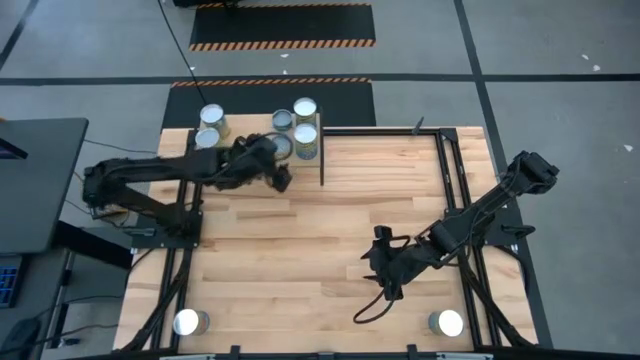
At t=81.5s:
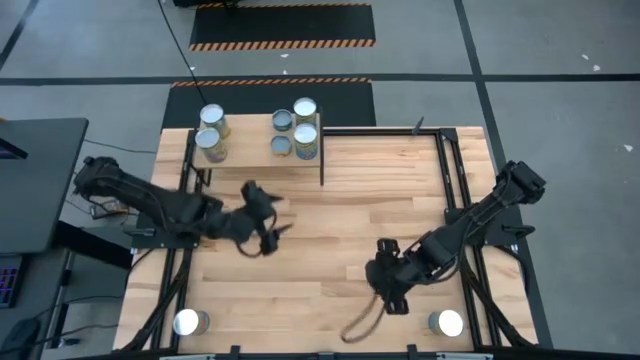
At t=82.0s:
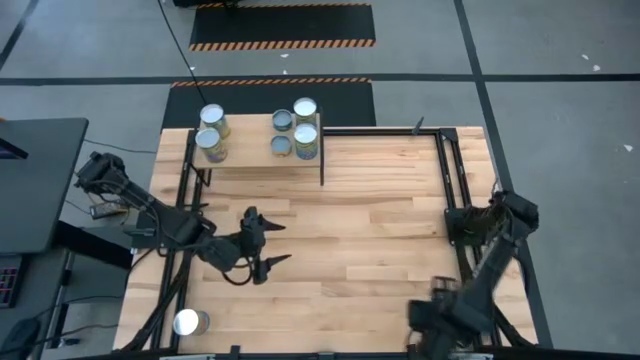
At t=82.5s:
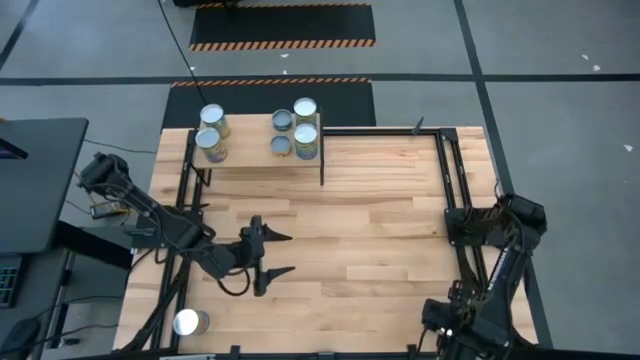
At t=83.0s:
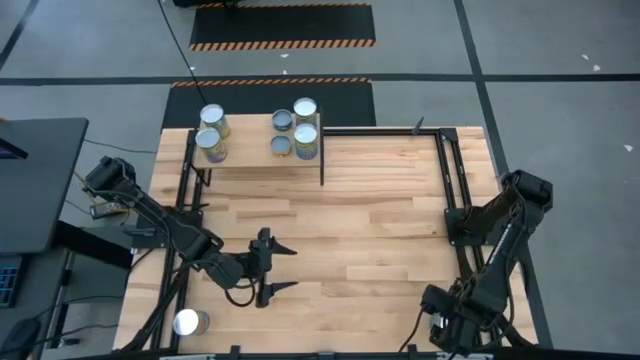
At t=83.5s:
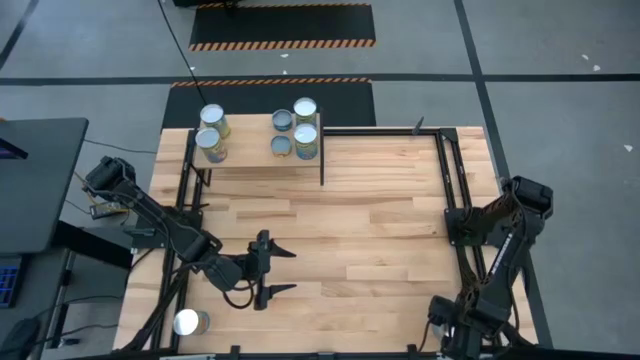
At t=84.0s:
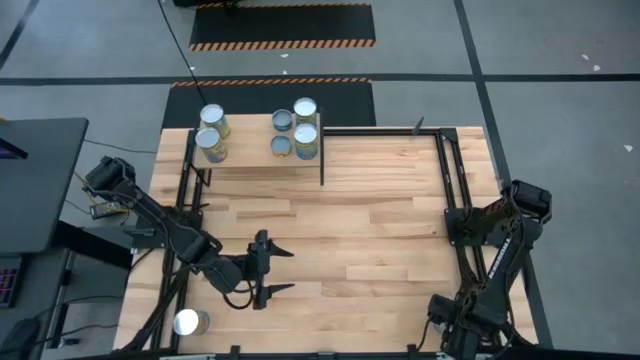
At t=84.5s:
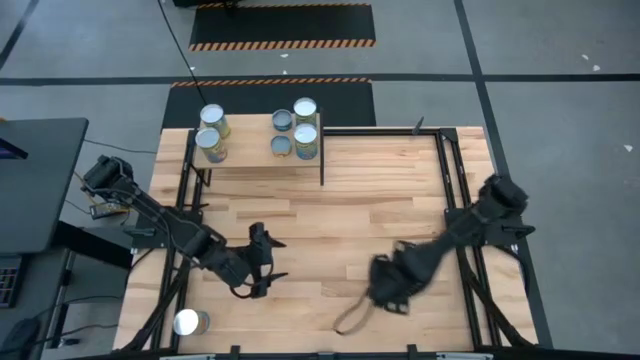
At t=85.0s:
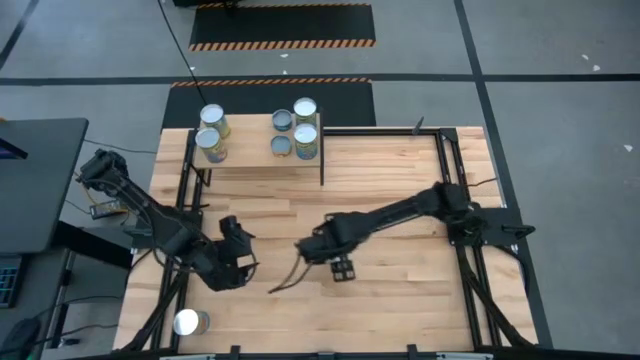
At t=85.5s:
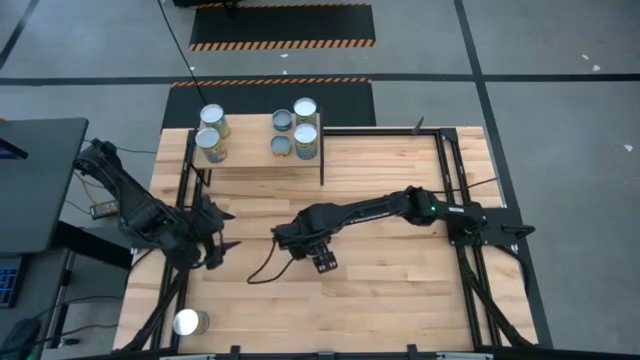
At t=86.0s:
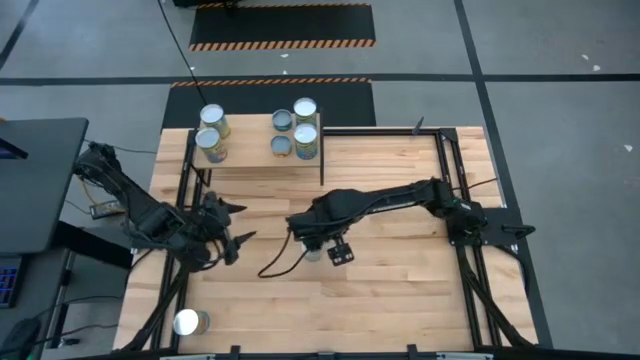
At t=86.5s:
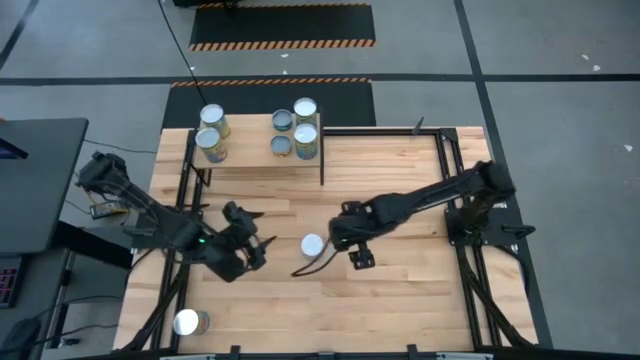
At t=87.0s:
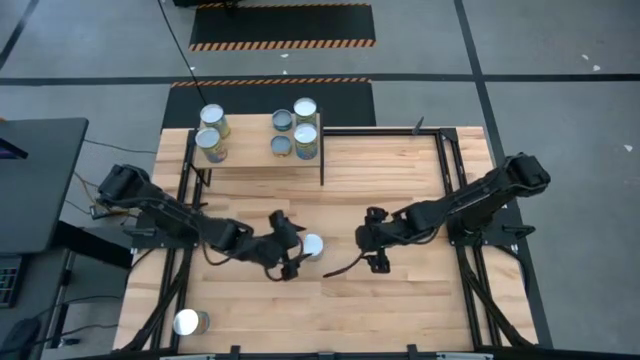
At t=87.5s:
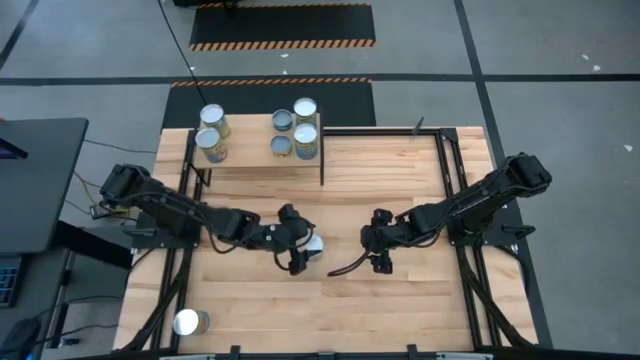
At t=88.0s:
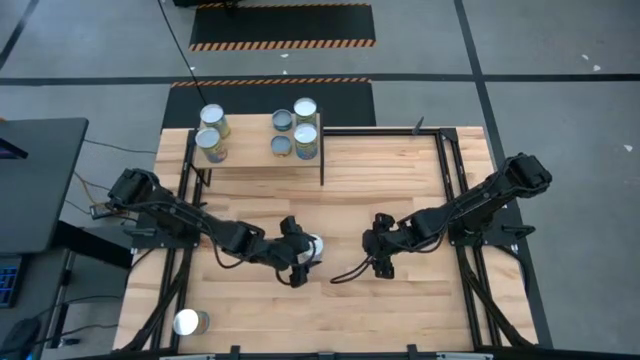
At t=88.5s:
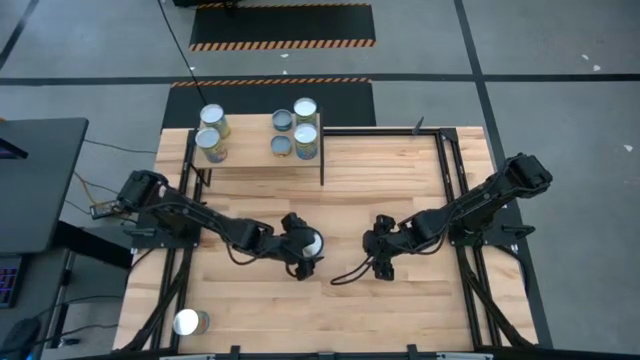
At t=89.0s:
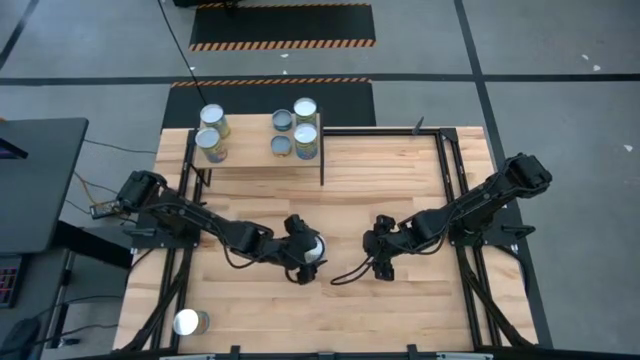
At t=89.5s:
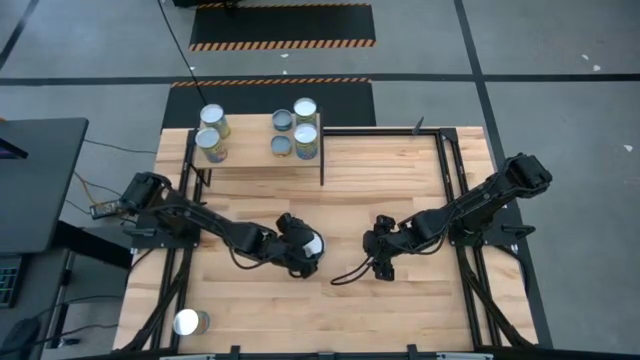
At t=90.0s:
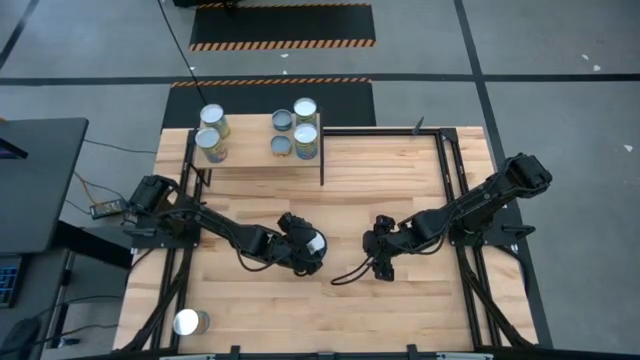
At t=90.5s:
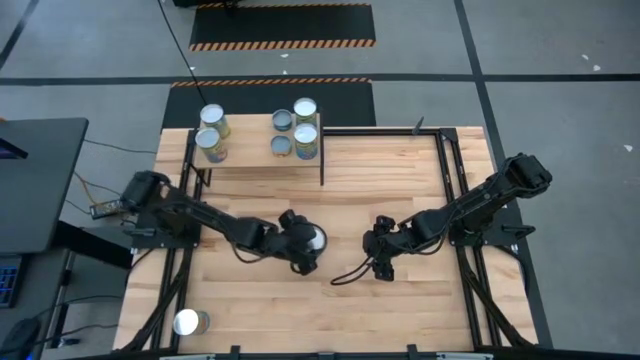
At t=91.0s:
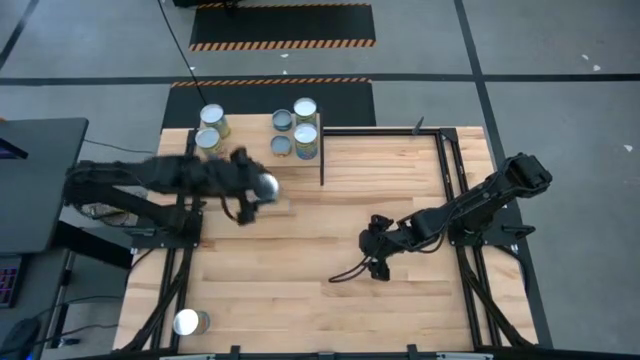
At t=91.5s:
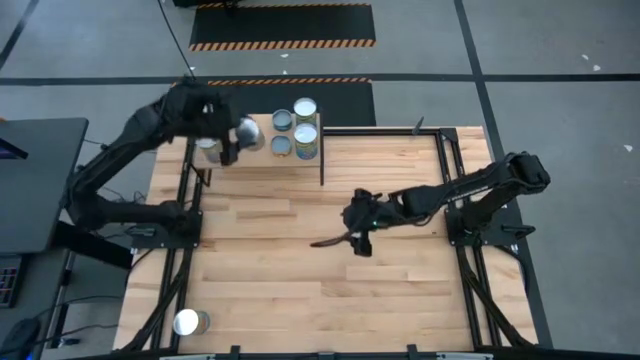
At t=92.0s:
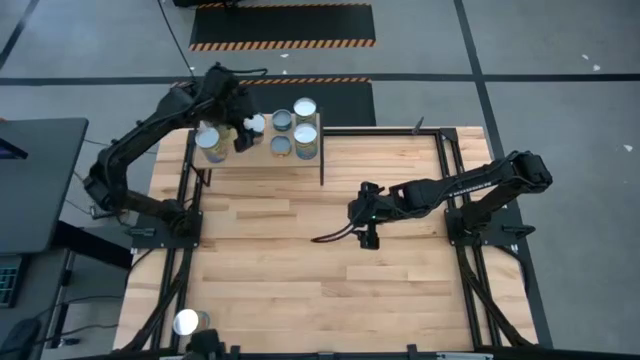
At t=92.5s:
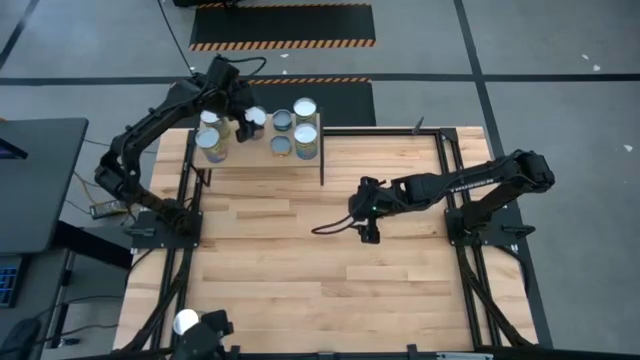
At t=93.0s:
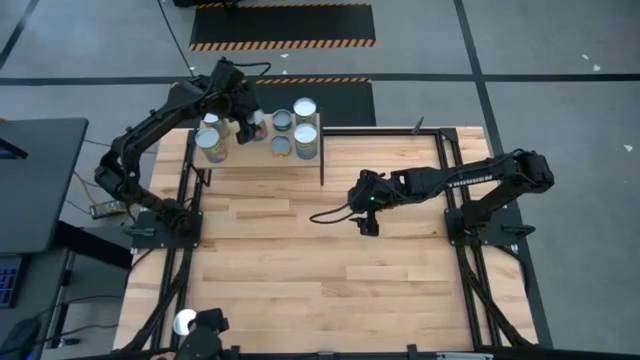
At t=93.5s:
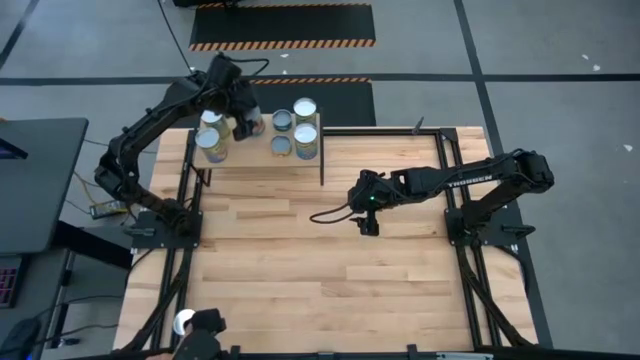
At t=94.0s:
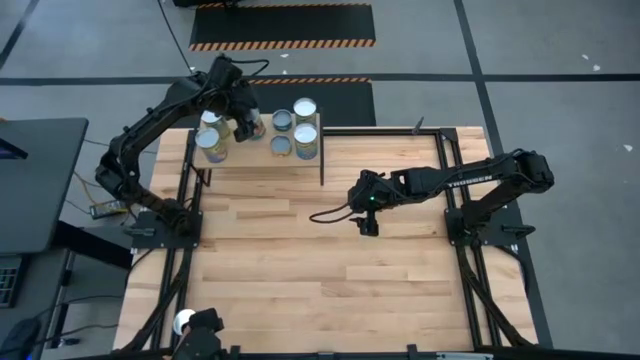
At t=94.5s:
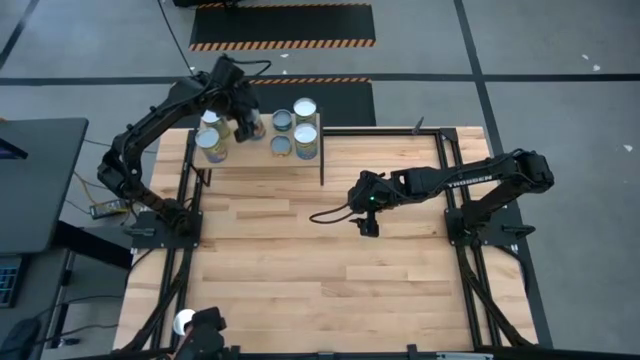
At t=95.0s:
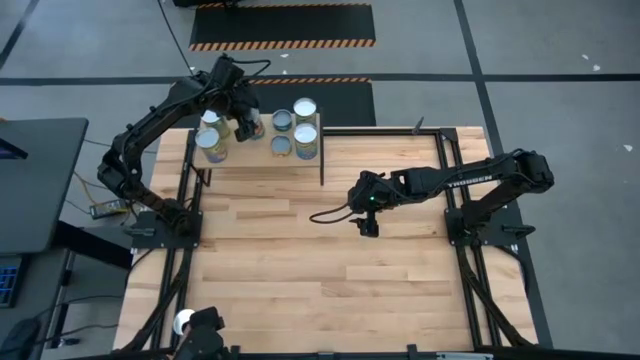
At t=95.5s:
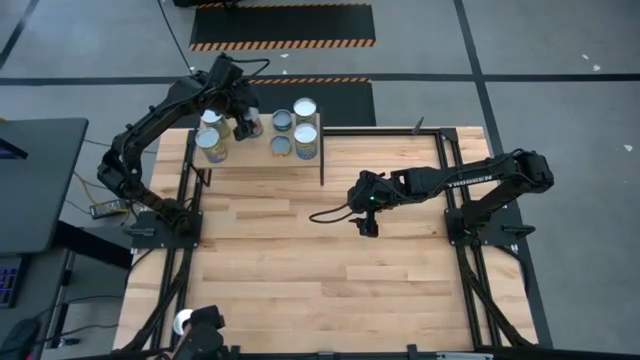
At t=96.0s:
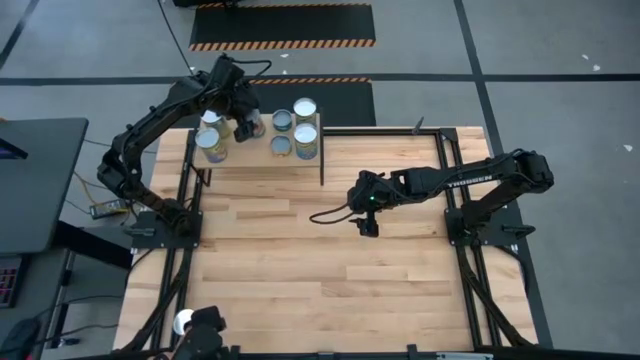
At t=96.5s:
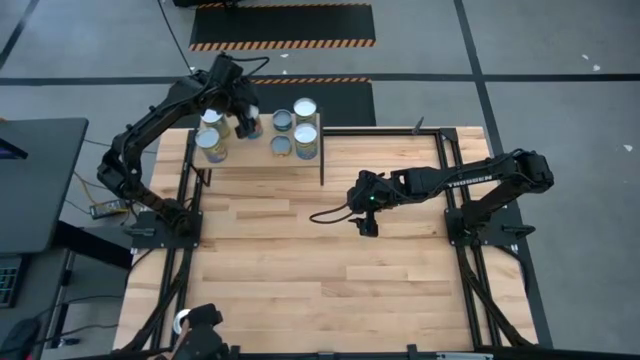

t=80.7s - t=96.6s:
Task: Pick and place cans onto a shelf
Put the right canned tomatoes on the shelf

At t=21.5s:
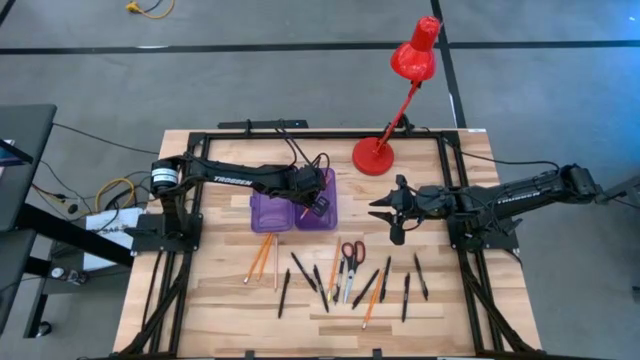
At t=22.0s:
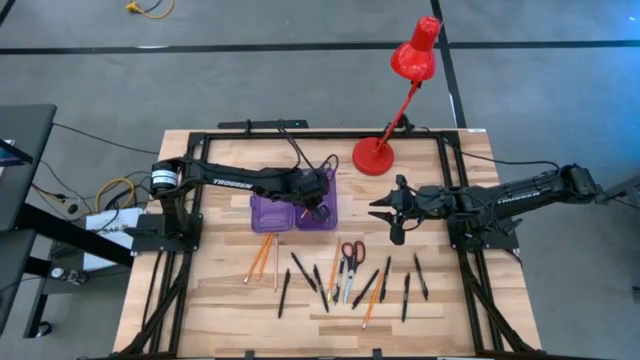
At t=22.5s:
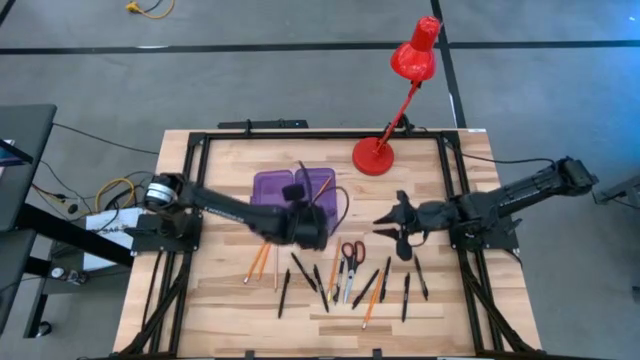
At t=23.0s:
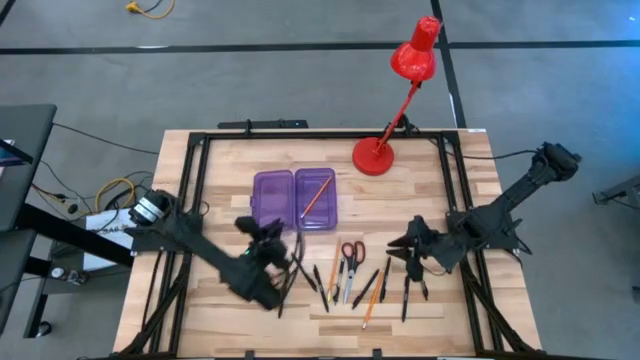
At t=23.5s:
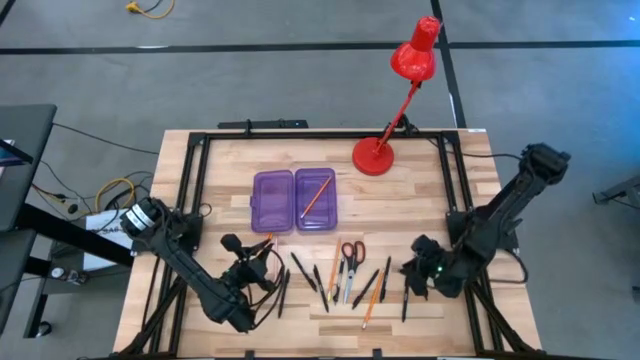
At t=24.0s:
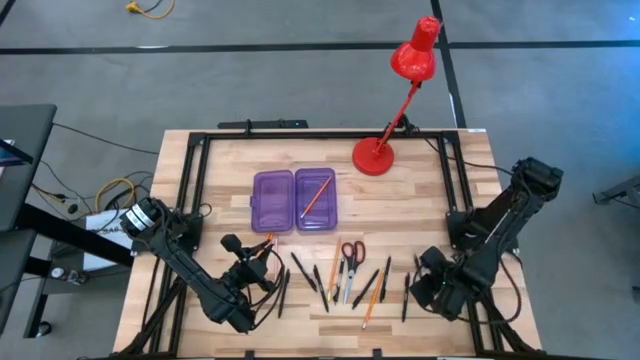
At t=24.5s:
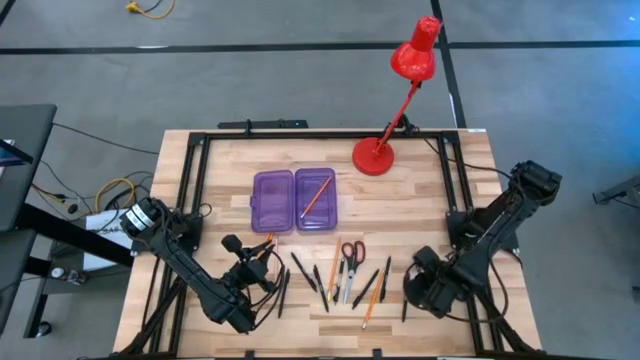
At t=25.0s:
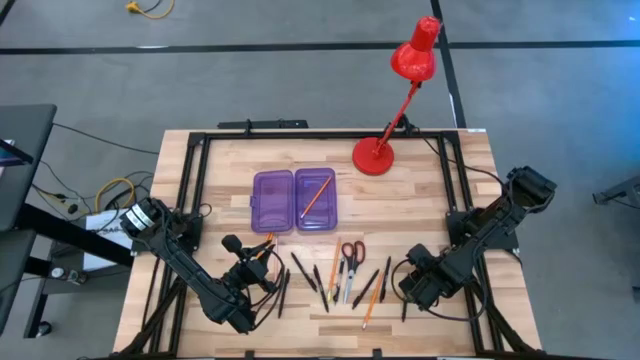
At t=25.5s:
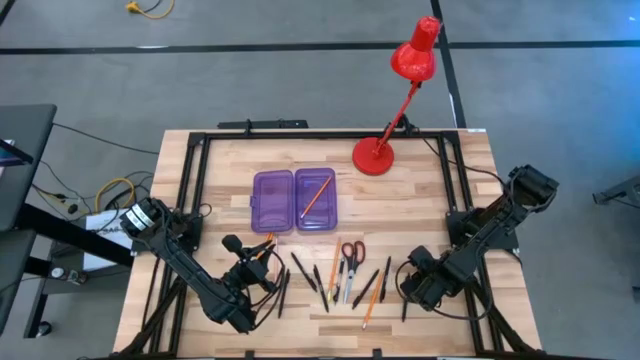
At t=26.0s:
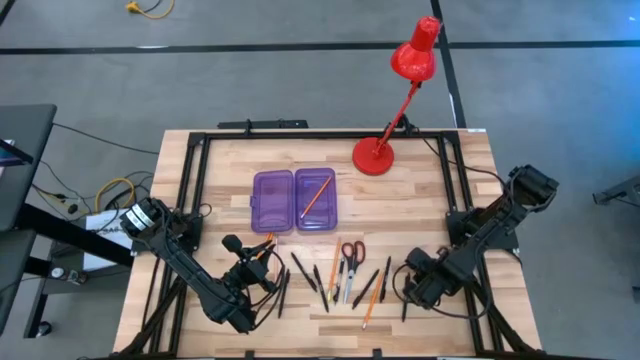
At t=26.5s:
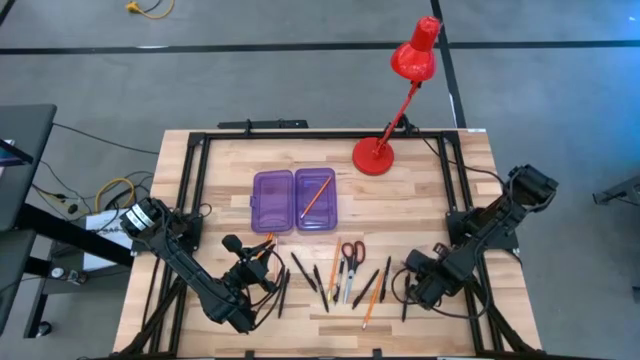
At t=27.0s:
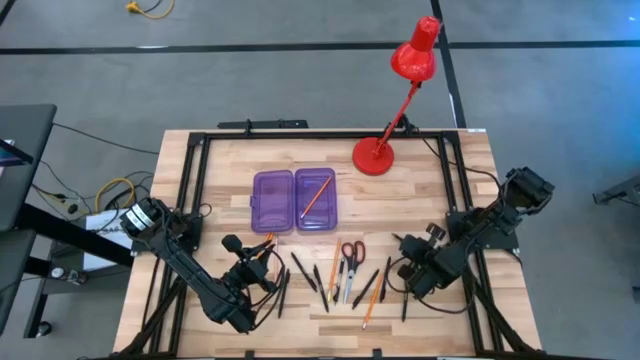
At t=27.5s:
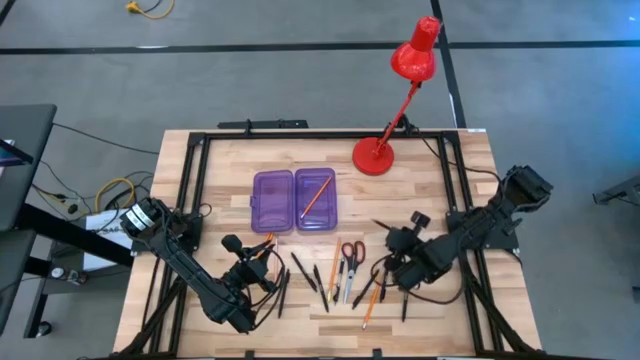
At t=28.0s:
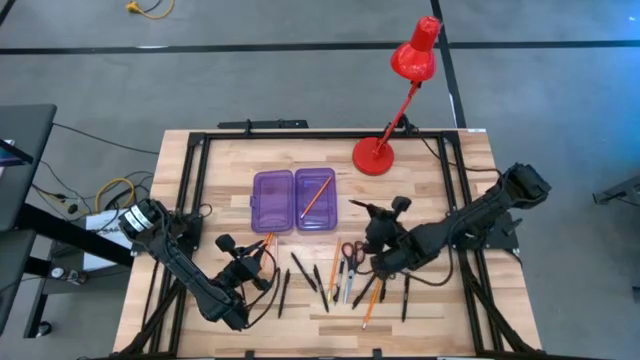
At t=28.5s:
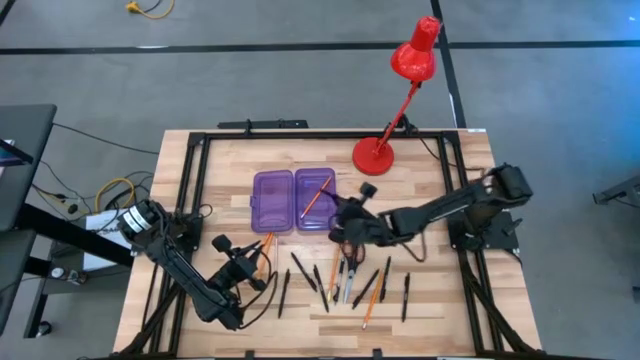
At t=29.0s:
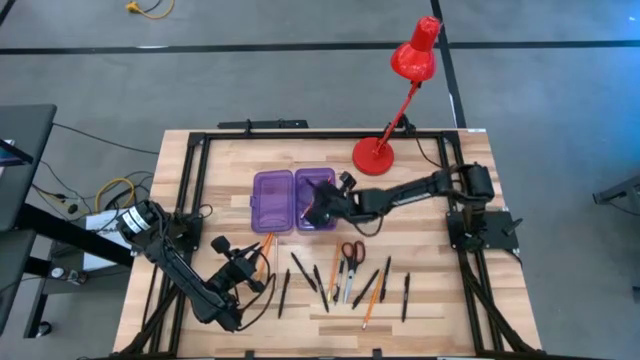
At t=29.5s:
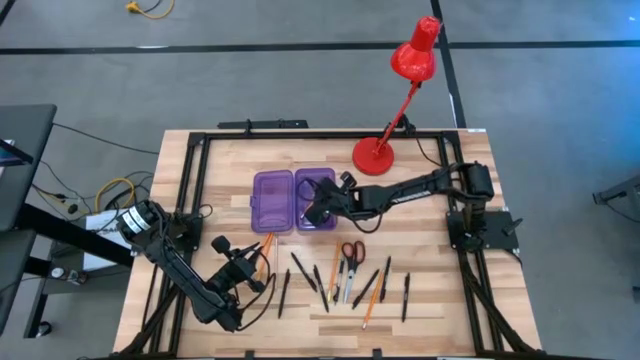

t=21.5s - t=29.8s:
Task: Pick & place school supplies into a supply box
Put the black pen into the violet supply box
